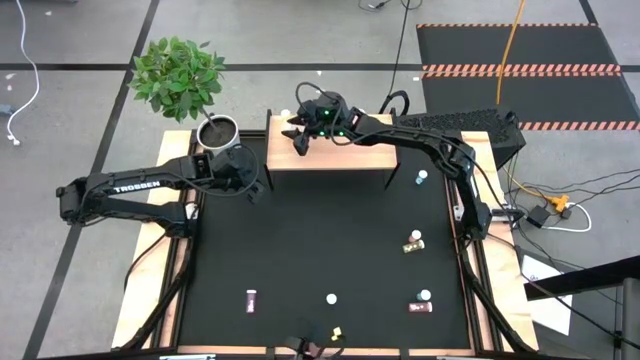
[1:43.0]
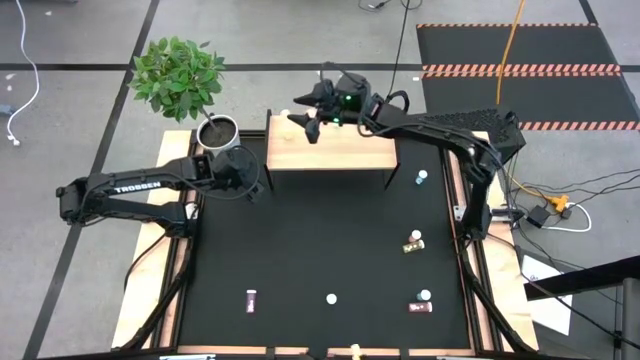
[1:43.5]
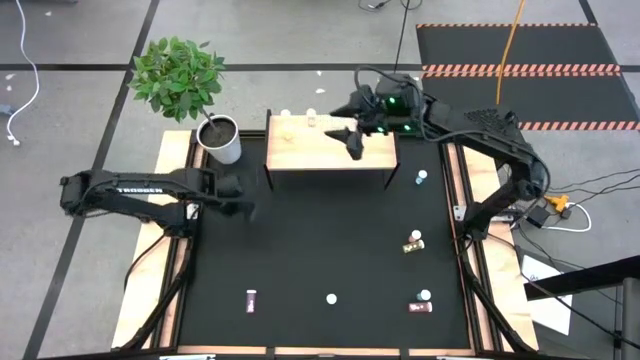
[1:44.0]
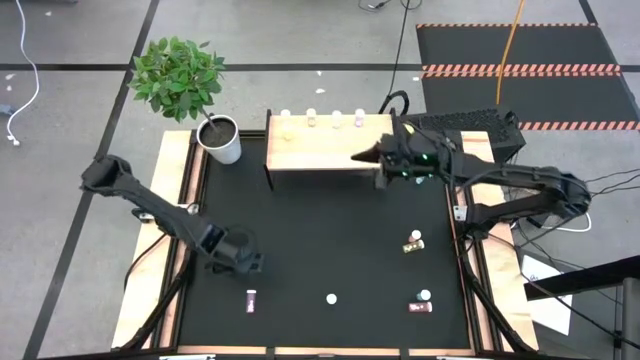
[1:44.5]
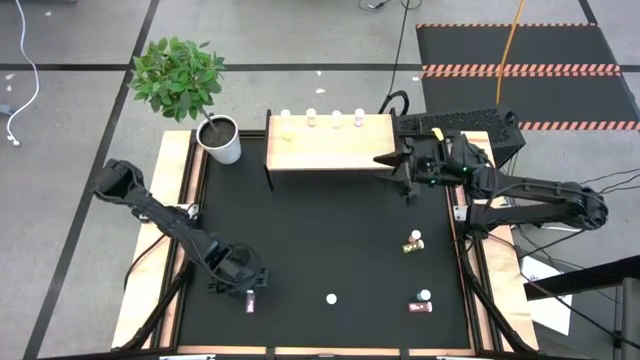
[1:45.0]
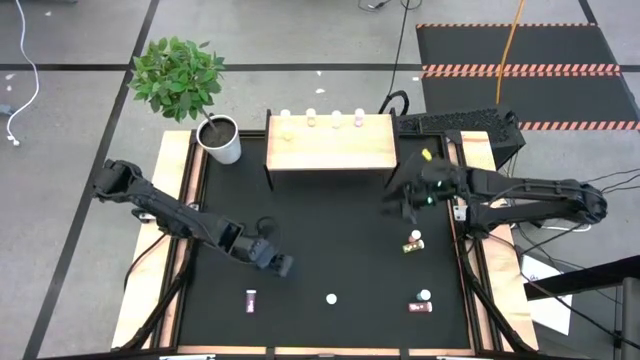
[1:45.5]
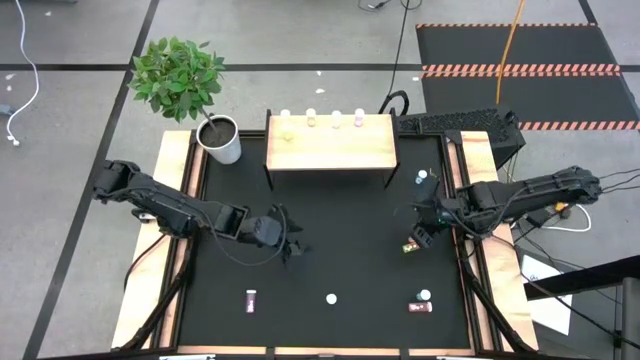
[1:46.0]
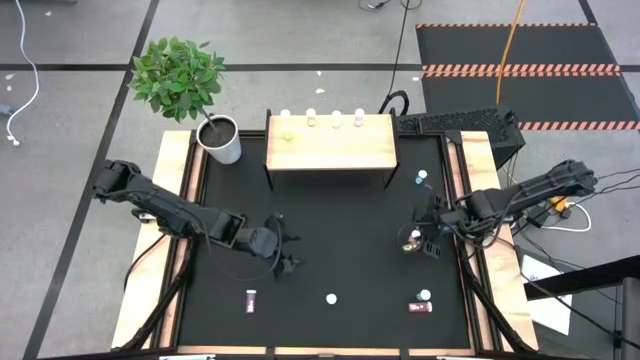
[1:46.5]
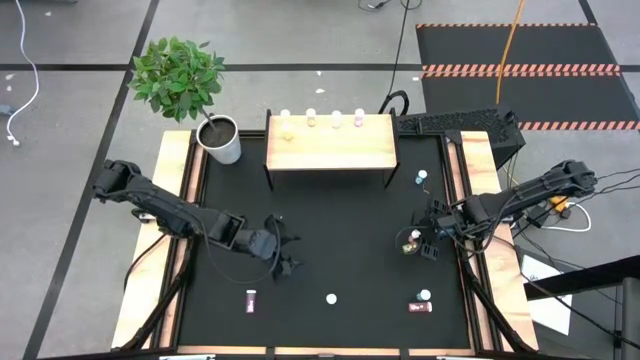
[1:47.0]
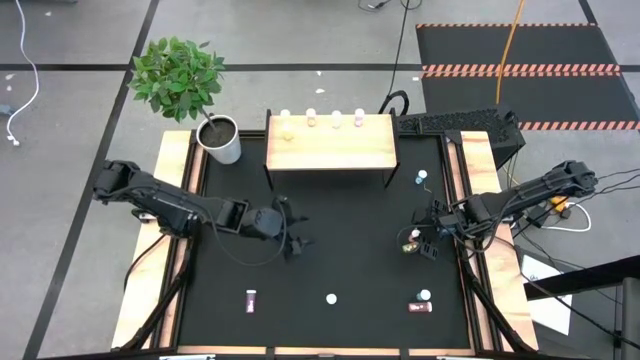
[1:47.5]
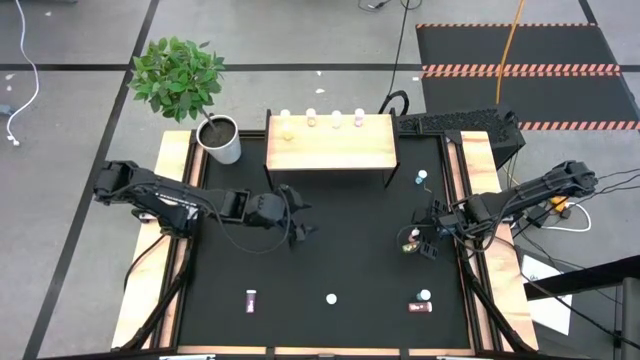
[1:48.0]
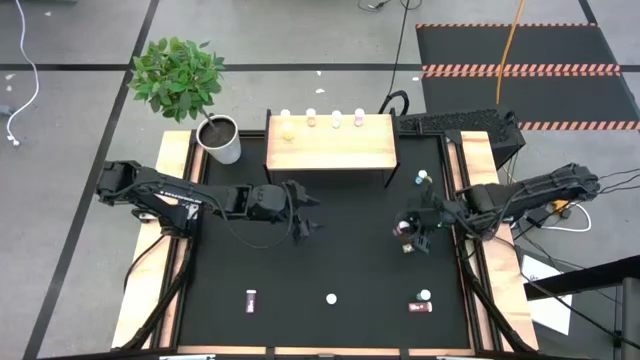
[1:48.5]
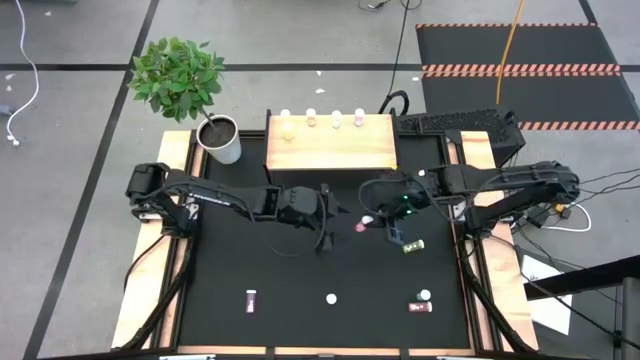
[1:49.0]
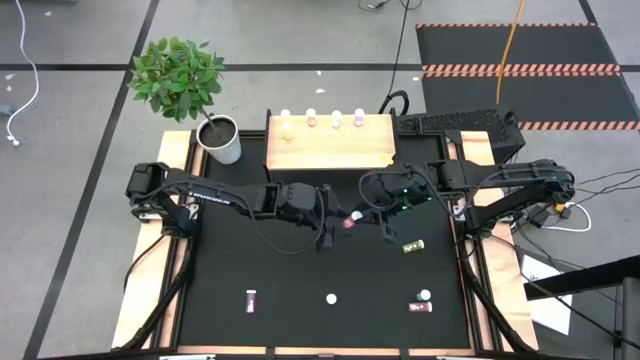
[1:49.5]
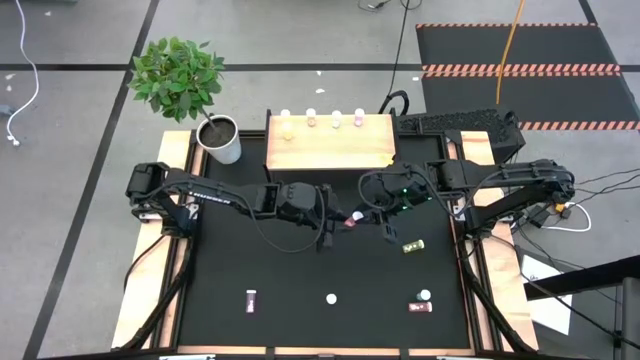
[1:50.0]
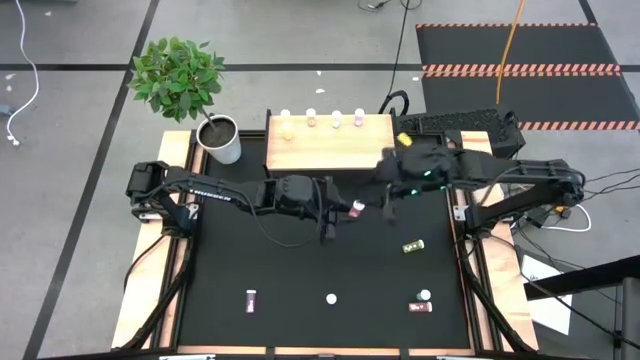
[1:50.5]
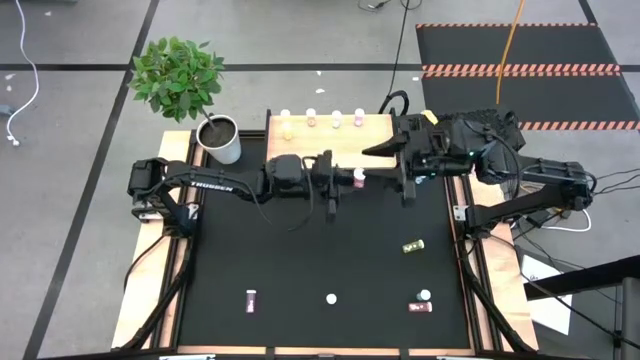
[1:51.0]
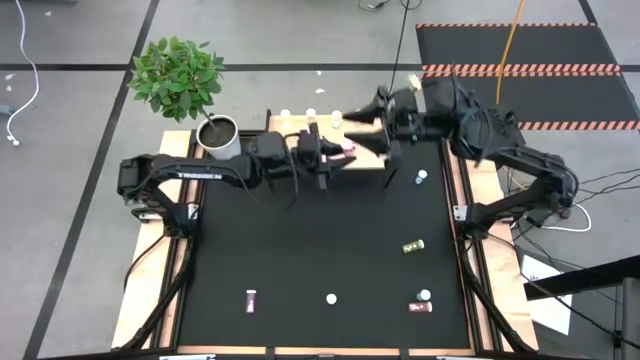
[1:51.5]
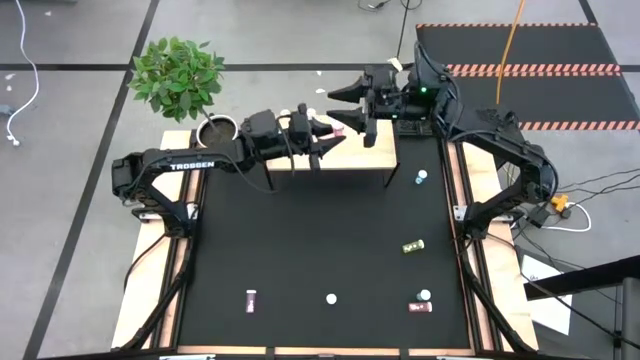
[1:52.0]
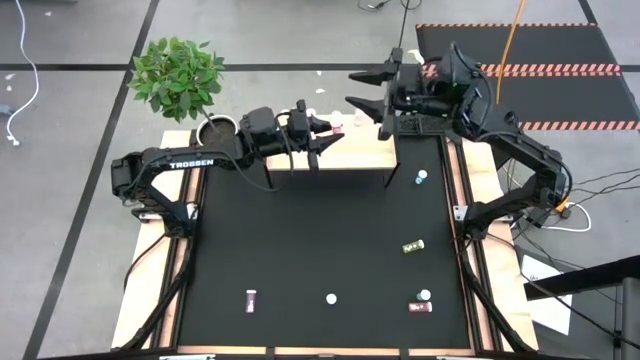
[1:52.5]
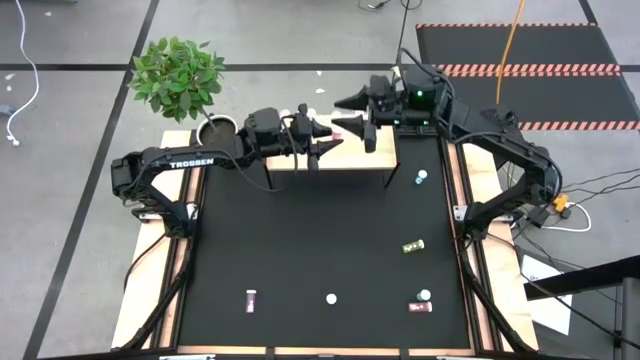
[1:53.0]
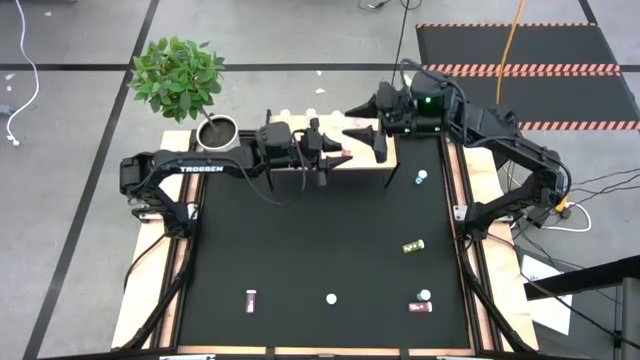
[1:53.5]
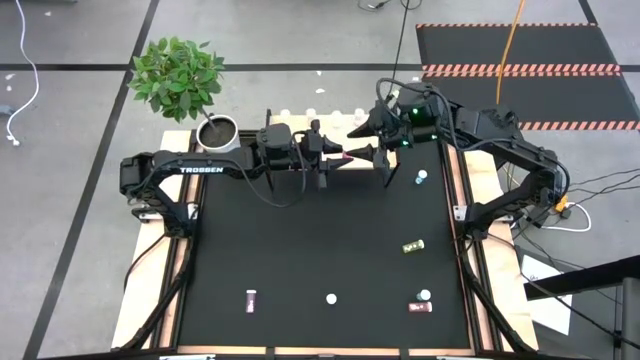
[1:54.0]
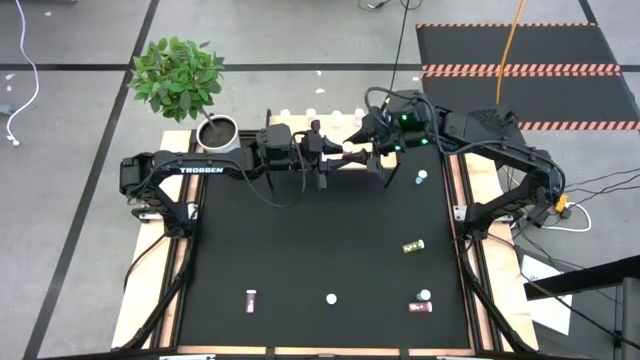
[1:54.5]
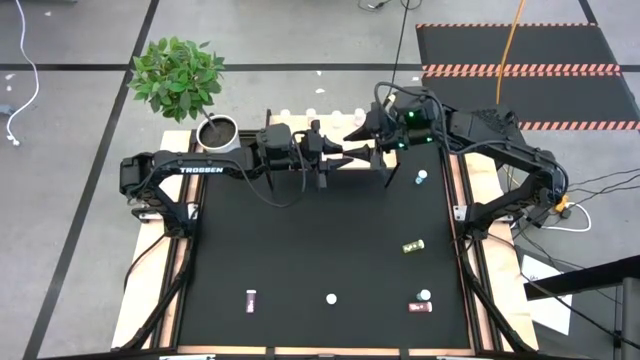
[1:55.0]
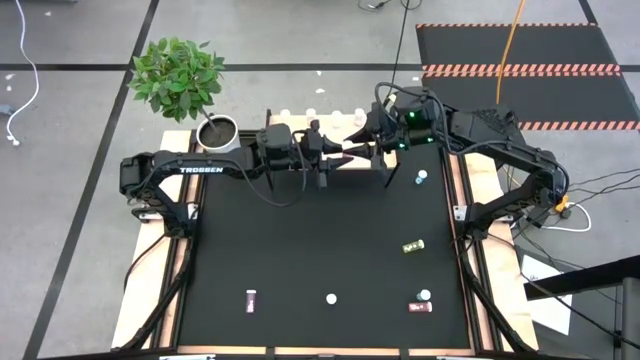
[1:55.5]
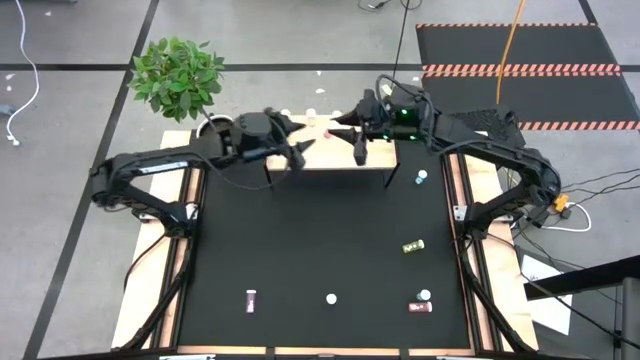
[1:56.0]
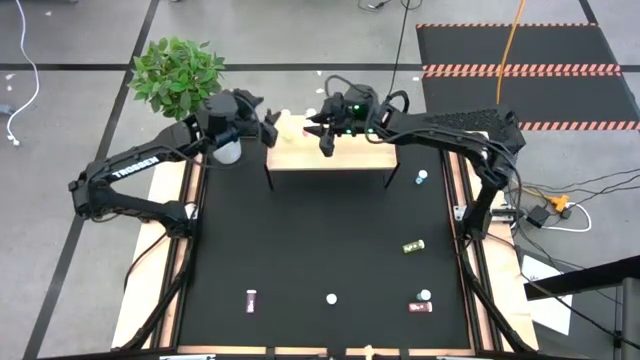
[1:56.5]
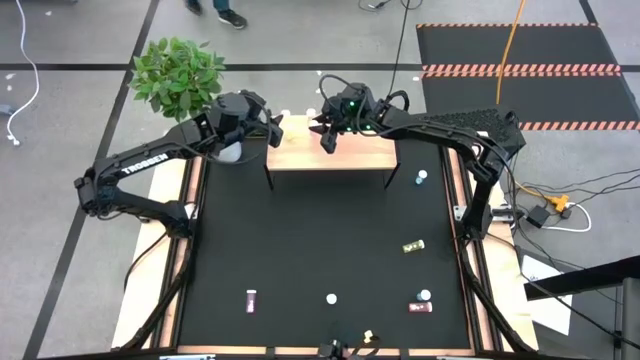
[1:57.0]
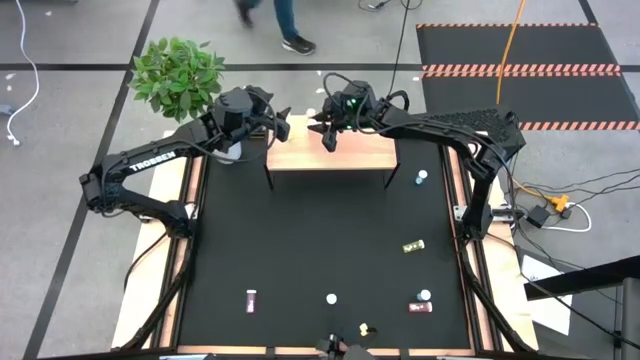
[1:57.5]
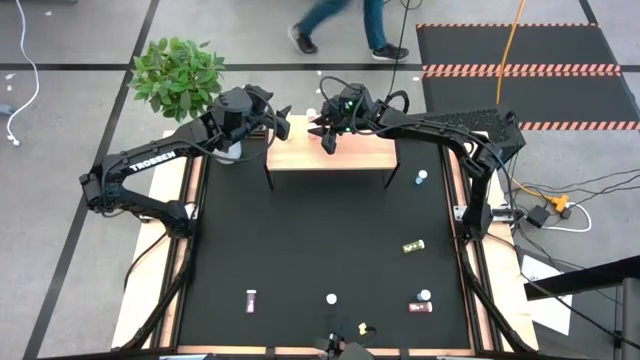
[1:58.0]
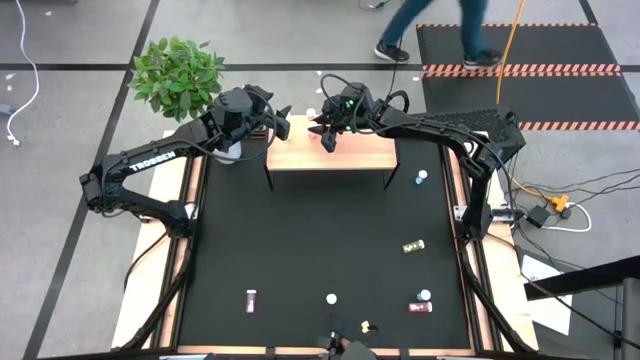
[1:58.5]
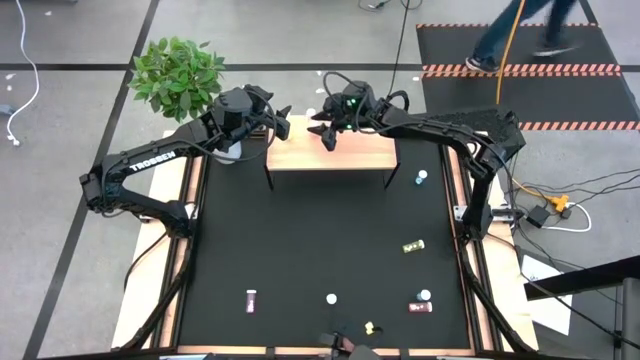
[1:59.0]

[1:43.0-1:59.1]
Task: Pick and place medicine bottles onto shelf by color
Put the top orange pill bottle on the shelf aligned with the other orange pill bottle

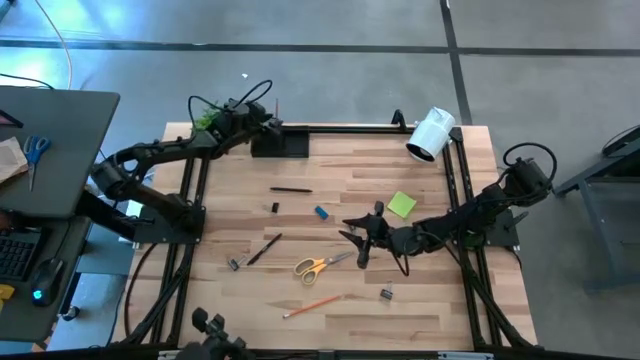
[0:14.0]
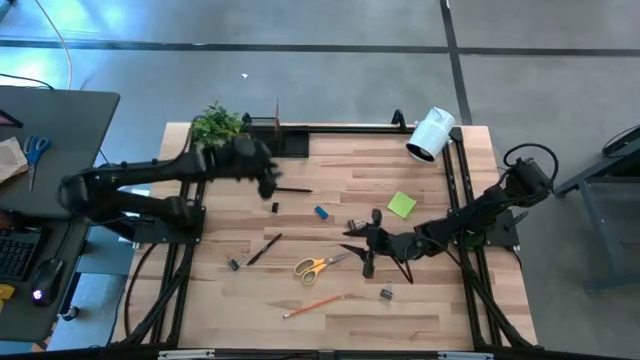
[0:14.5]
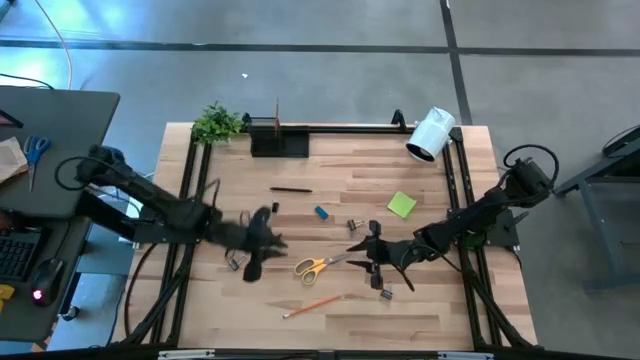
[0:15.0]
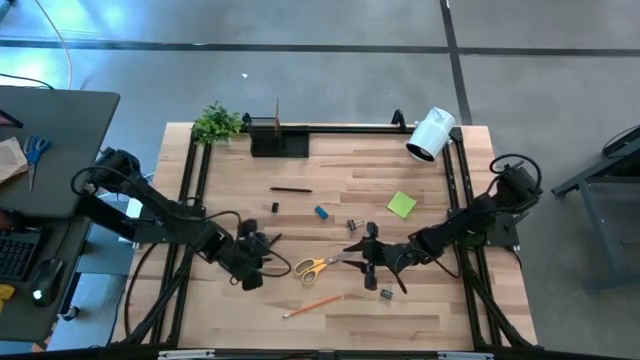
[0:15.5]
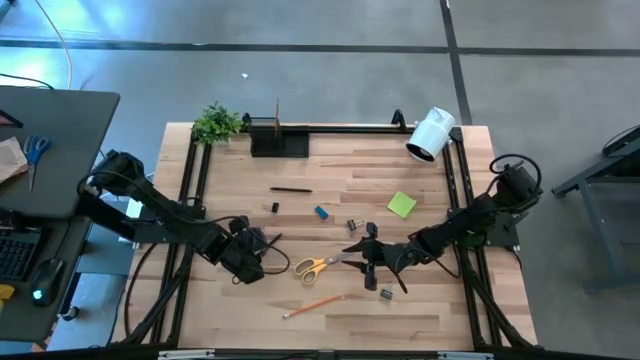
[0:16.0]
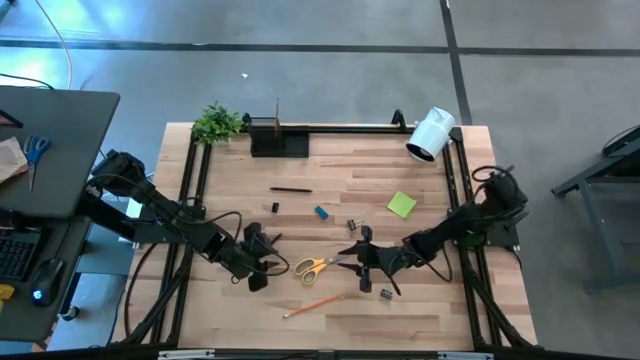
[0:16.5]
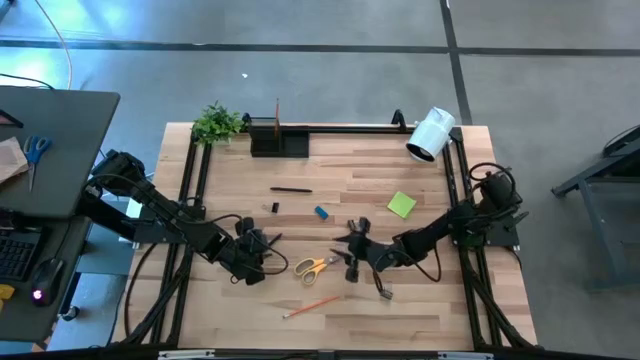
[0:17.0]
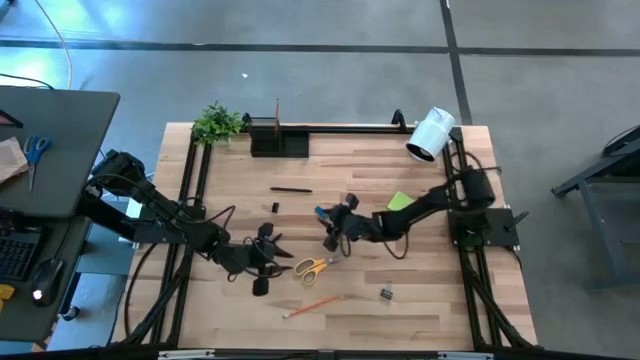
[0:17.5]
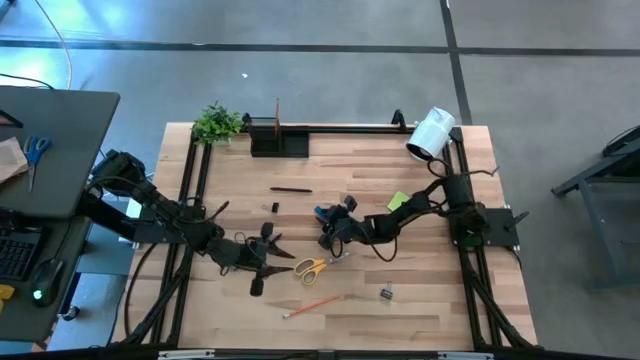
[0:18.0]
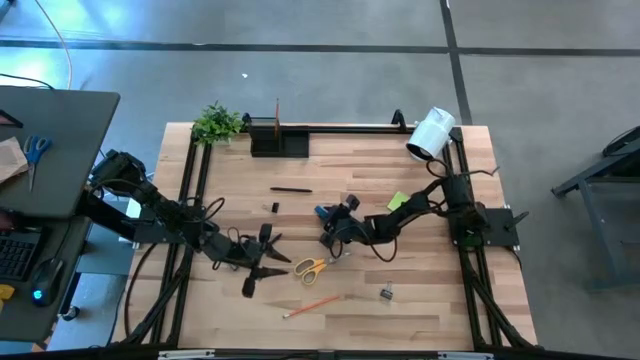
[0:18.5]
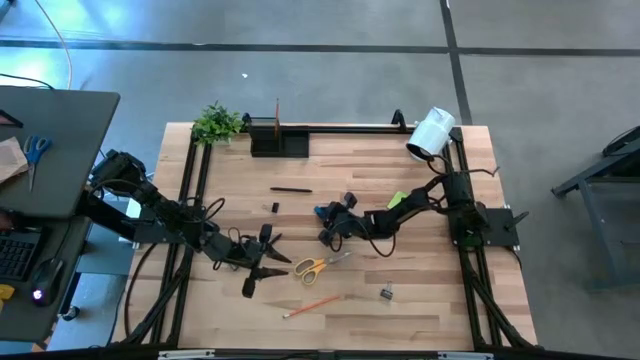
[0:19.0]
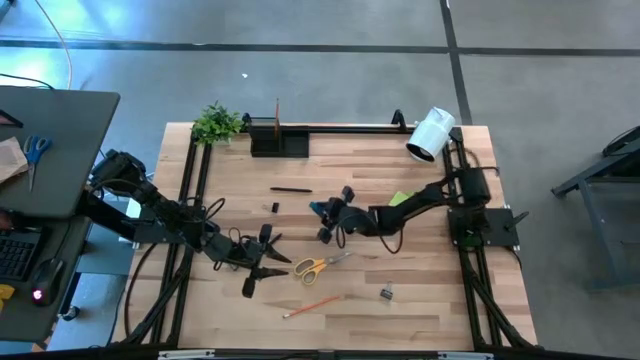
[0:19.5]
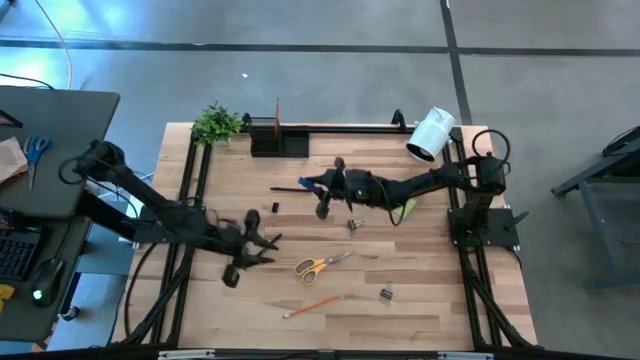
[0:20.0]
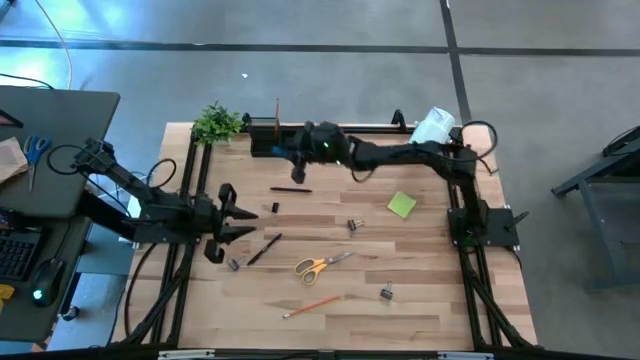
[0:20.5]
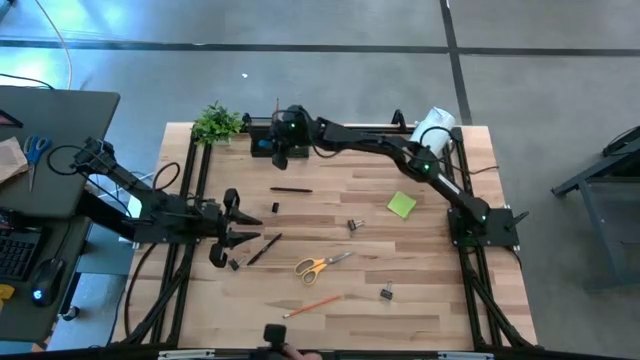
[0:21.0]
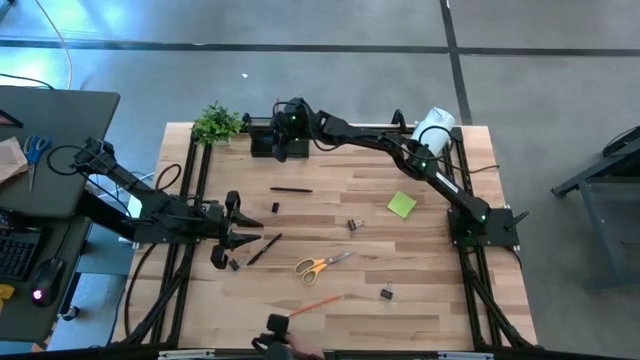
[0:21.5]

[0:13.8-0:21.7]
Task: Pick and place office supplies into organizer
Put the blue eraser into the bottom left section of the desk organizer
